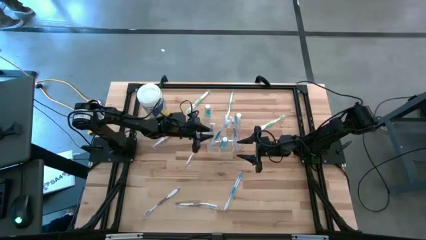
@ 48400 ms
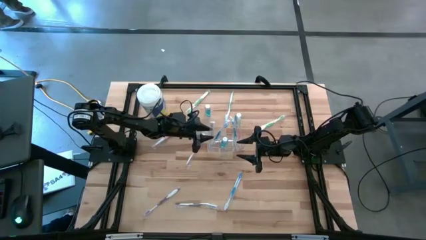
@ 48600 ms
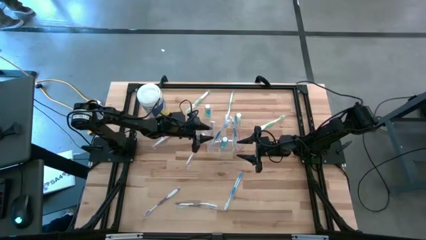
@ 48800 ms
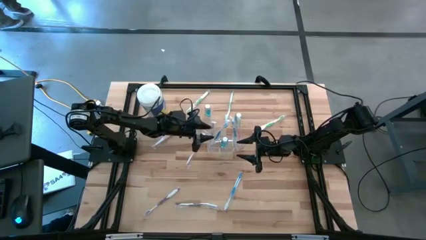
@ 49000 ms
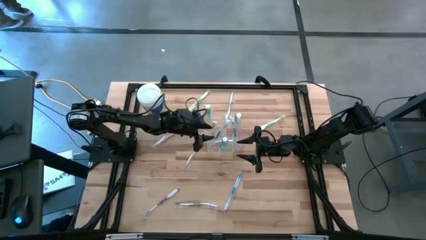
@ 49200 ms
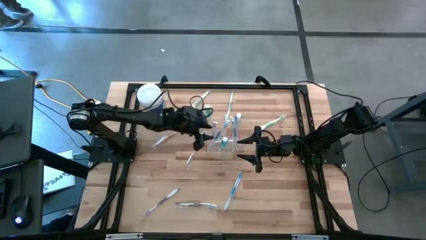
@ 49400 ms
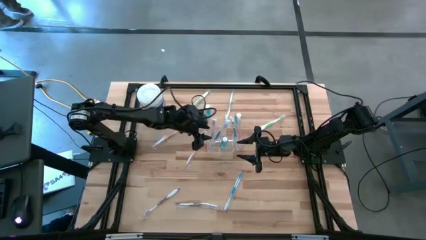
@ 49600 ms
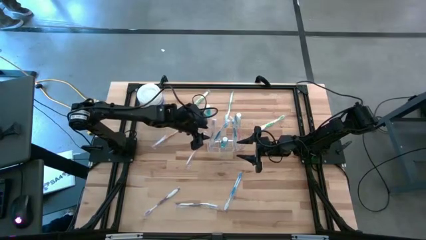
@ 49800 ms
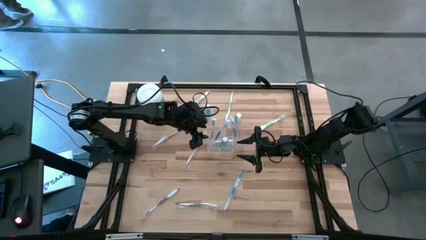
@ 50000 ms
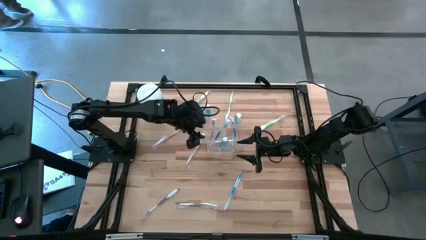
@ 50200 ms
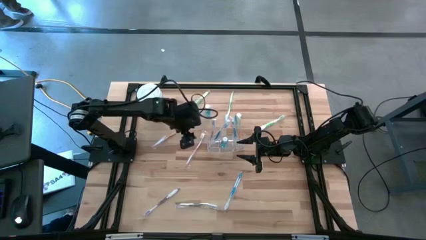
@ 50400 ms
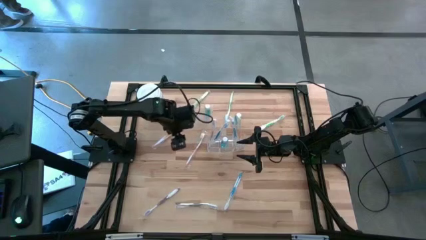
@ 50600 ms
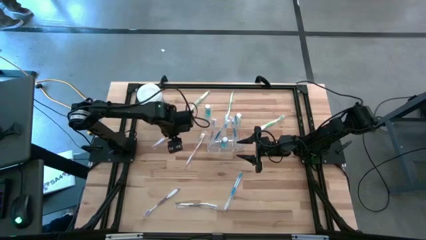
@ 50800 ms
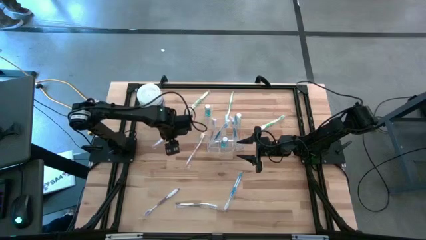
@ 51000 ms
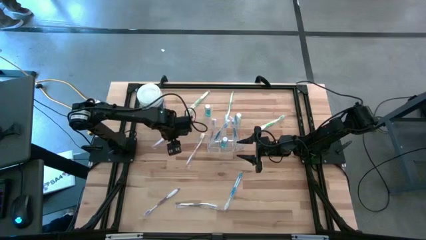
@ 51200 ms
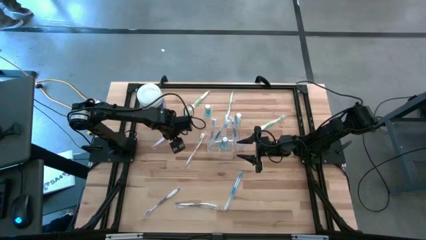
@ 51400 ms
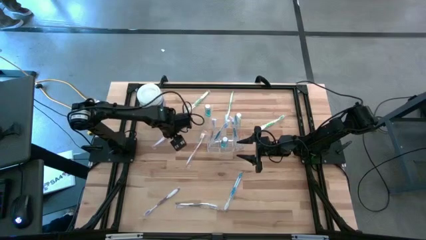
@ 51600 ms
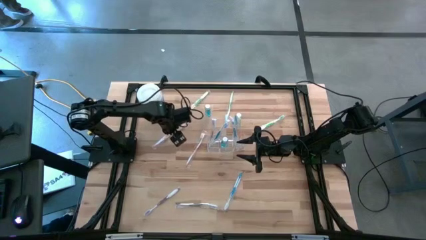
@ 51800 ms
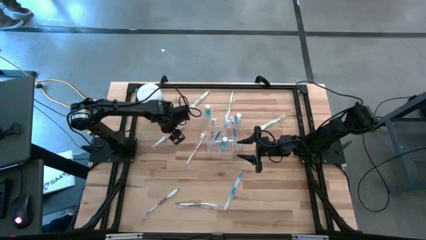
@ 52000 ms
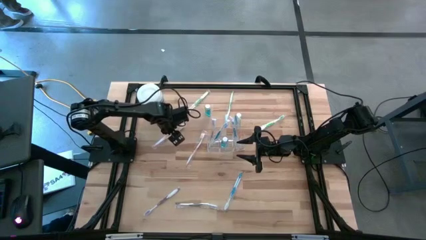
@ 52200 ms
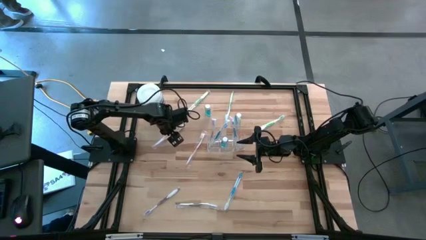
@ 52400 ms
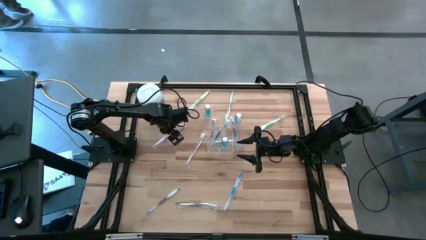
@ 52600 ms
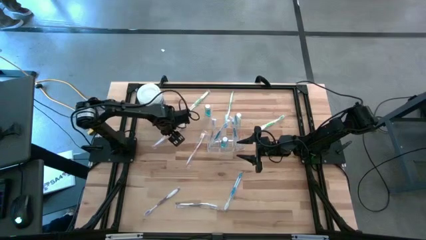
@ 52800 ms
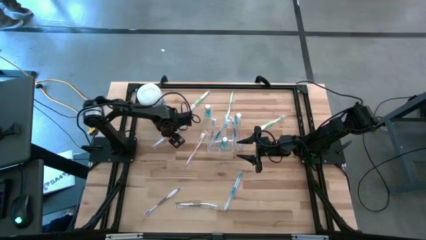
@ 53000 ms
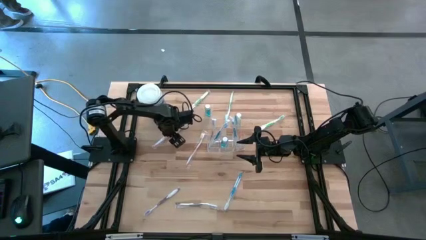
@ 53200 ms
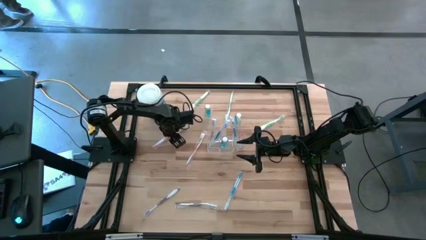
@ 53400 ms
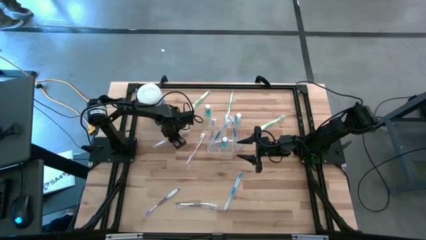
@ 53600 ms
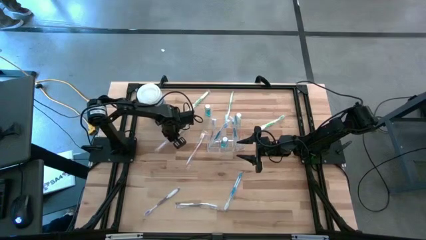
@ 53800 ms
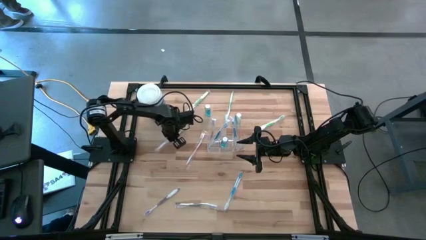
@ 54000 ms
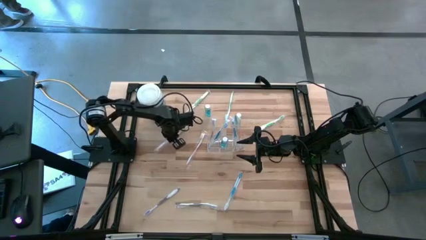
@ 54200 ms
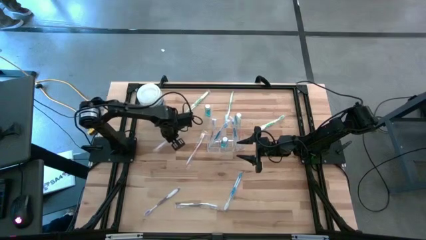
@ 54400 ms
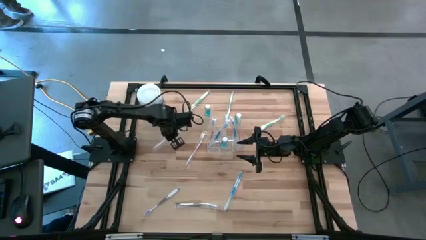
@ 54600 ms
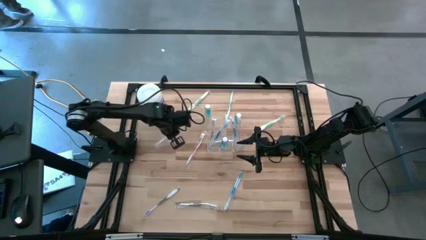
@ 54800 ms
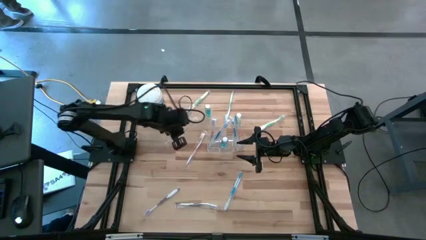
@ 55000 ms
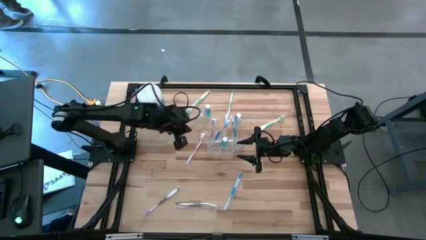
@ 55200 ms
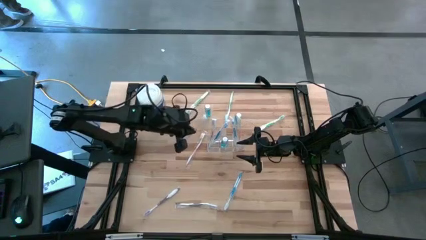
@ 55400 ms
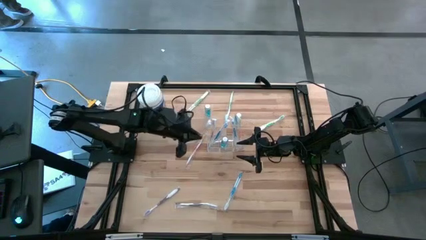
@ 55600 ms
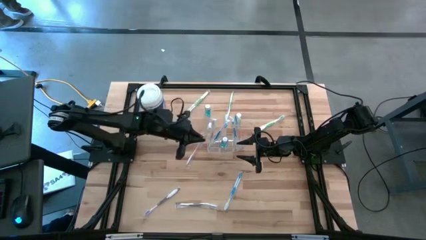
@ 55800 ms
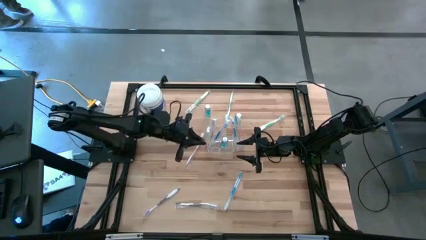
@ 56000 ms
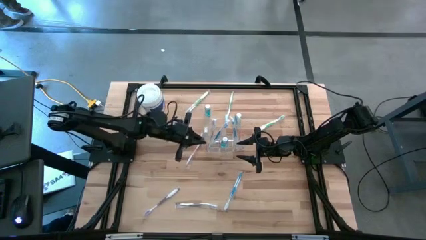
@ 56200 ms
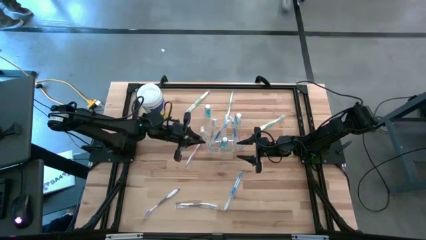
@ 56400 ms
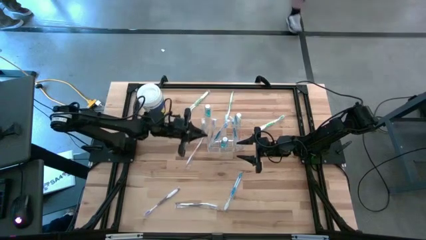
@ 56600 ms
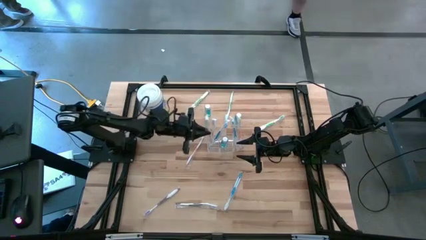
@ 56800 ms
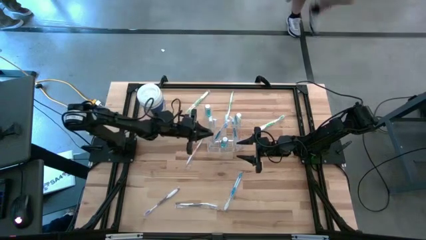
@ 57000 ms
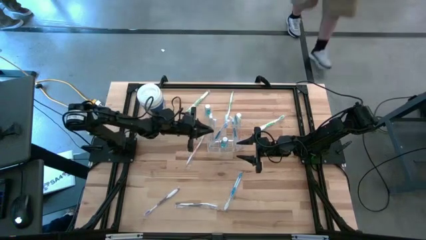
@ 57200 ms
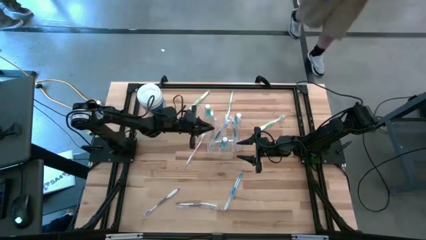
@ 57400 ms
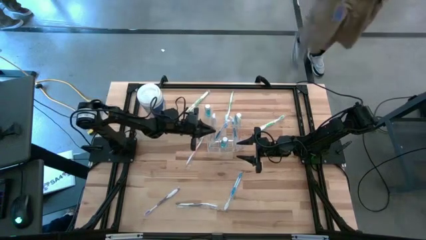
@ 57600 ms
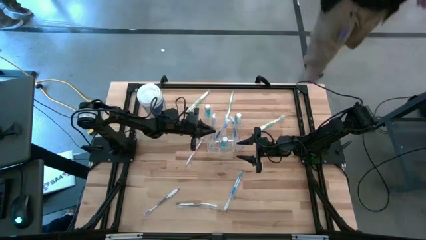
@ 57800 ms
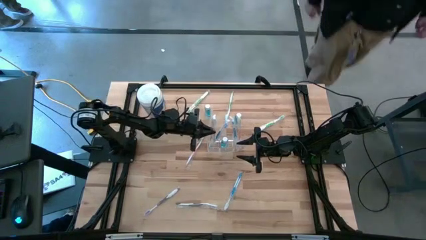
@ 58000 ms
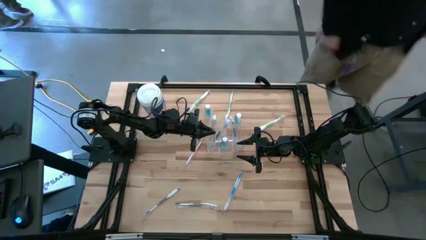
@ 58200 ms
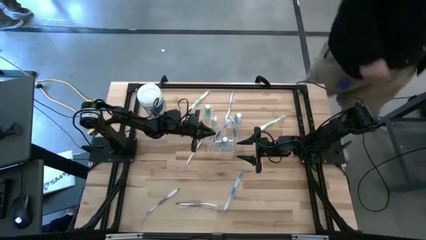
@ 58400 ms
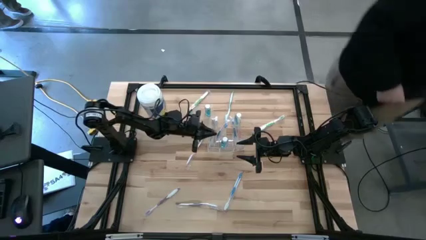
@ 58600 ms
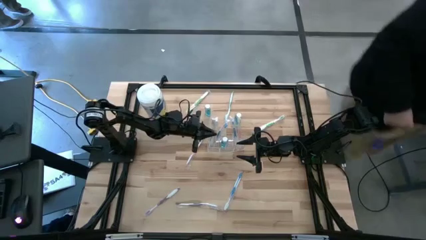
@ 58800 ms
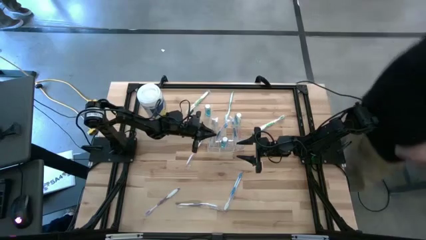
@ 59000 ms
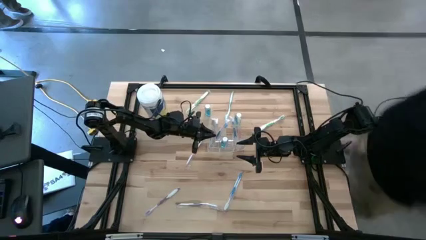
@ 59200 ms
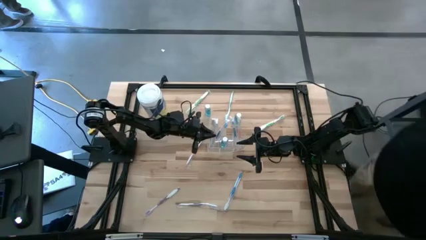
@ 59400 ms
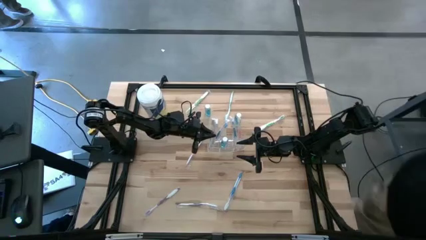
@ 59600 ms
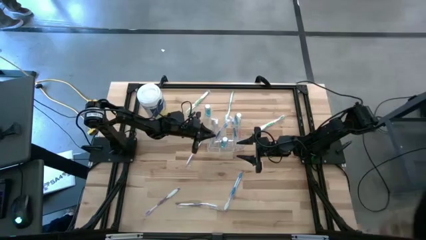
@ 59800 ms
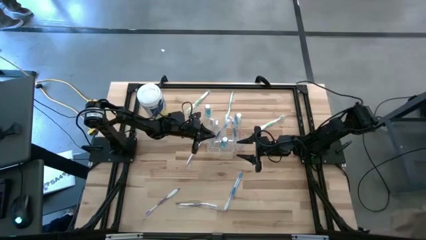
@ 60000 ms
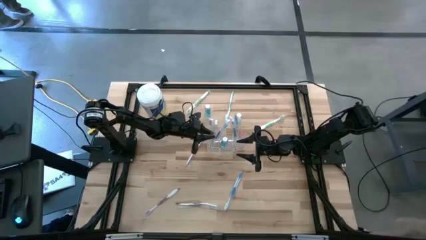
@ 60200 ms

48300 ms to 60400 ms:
Task: Pick & Place toothbrushing station
Put the left orange toothbrush into the left section of the transparent organizer
